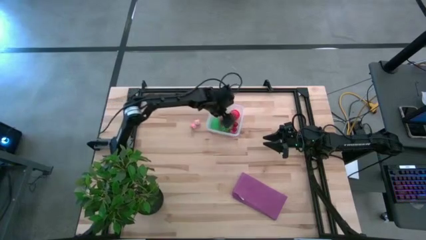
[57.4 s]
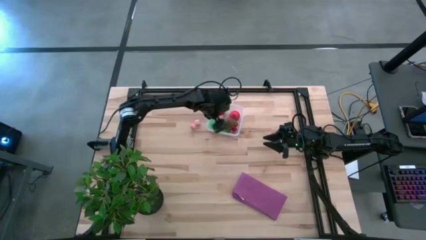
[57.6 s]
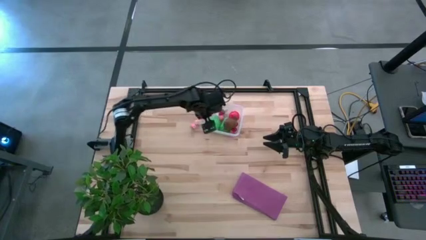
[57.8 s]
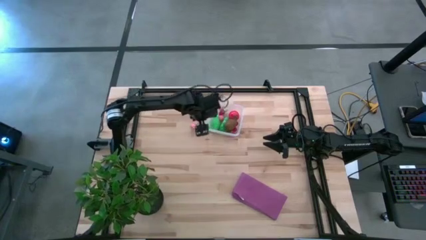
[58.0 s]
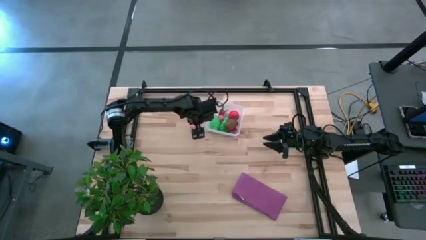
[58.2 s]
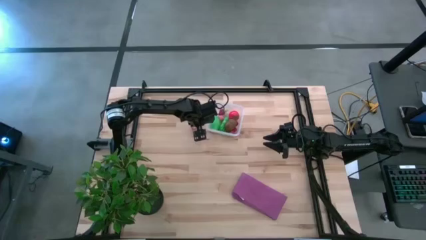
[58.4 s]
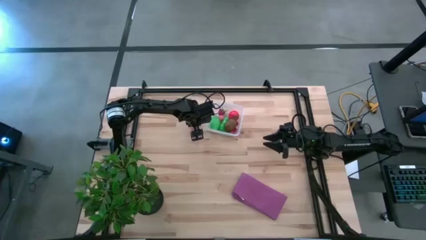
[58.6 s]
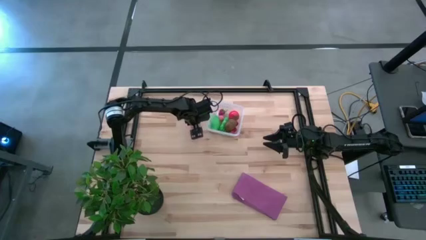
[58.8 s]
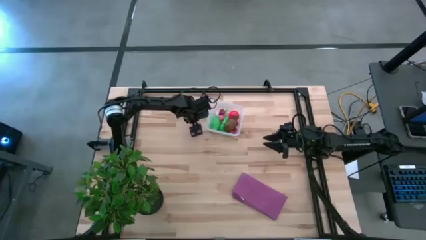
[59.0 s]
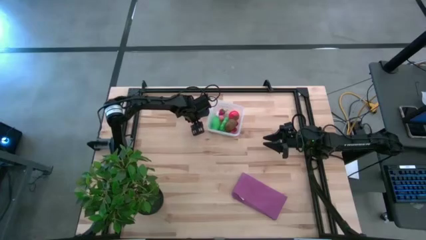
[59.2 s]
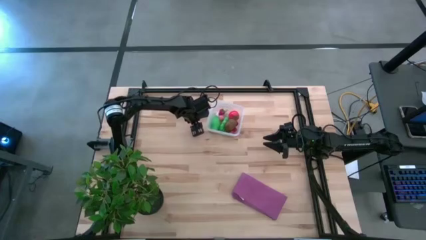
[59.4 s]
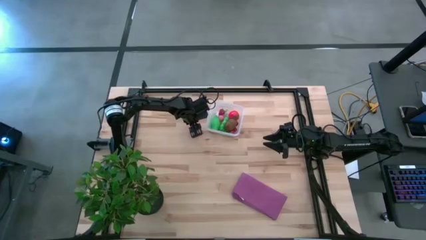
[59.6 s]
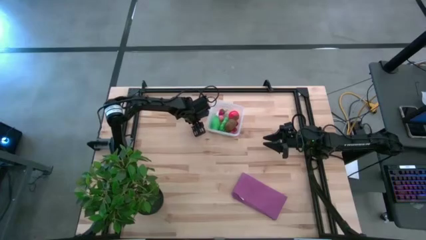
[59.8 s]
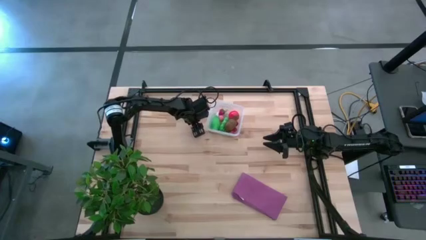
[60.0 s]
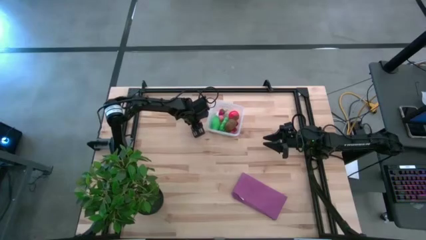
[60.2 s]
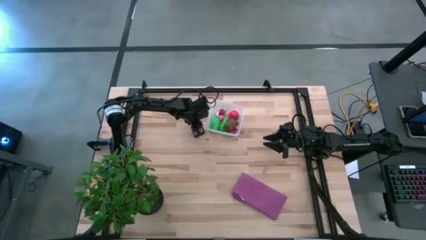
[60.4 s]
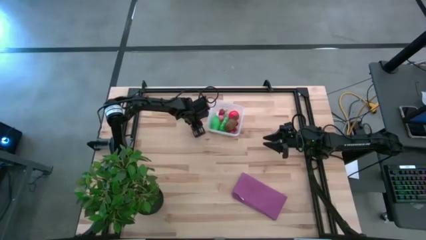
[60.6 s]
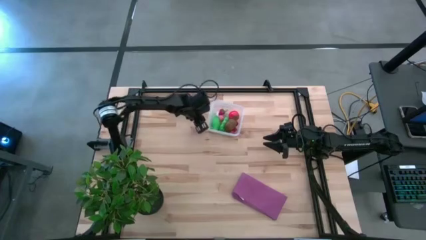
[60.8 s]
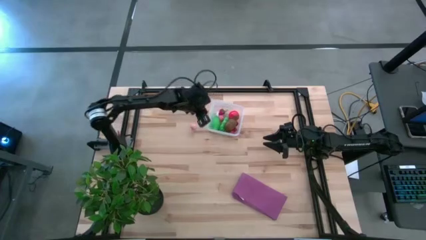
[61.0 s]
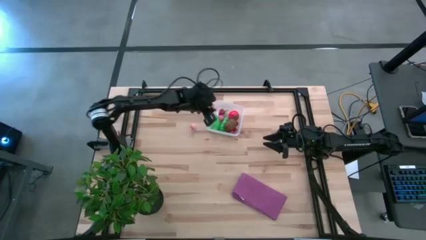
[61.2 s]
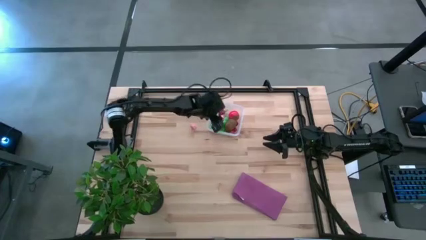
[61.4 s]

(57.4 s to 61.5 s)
Task: Pick and placing Produce into tupperware
Put the top peach in the transparent bin

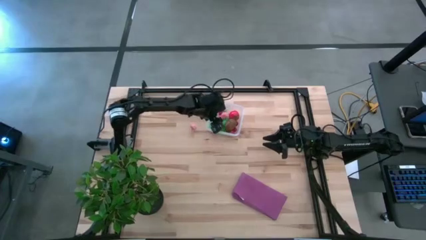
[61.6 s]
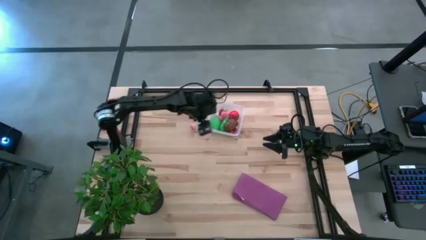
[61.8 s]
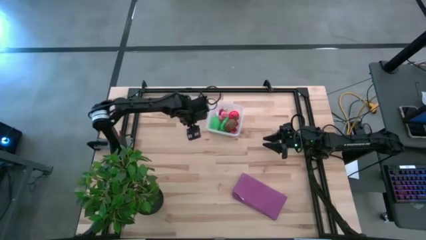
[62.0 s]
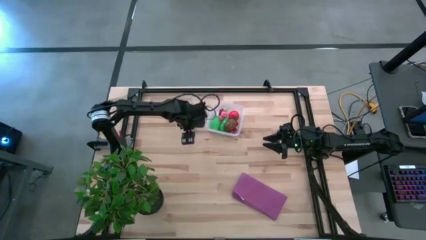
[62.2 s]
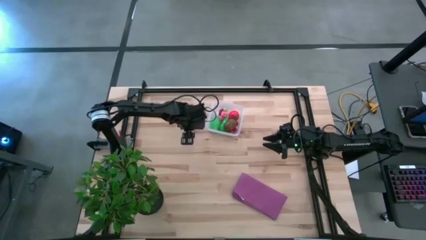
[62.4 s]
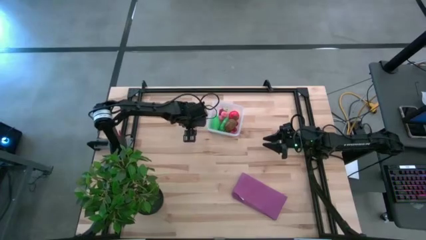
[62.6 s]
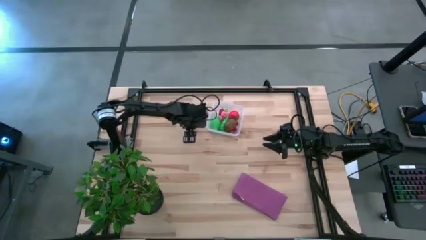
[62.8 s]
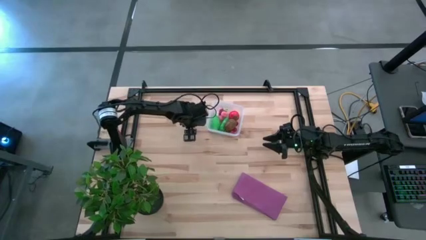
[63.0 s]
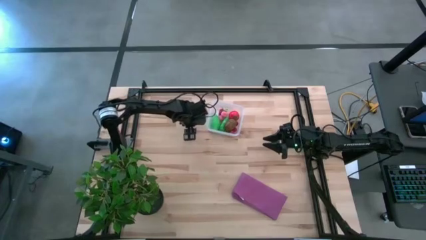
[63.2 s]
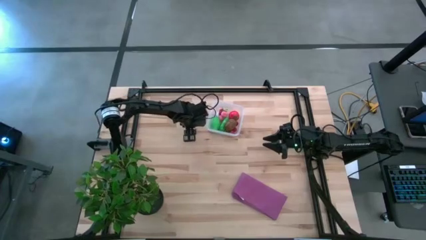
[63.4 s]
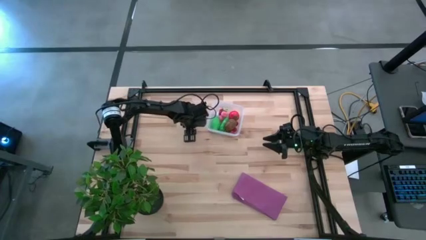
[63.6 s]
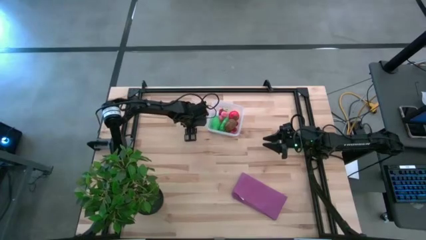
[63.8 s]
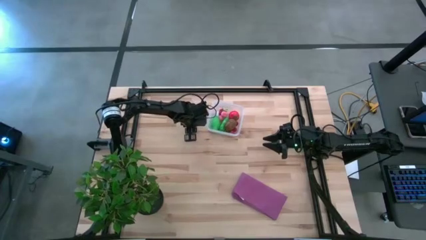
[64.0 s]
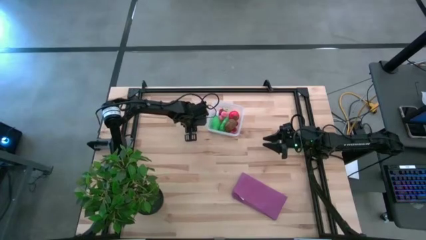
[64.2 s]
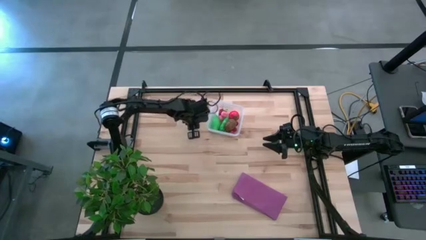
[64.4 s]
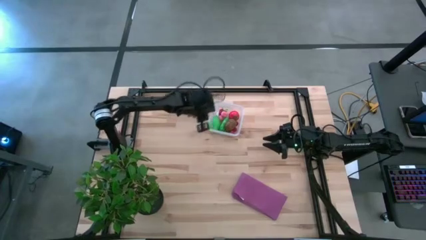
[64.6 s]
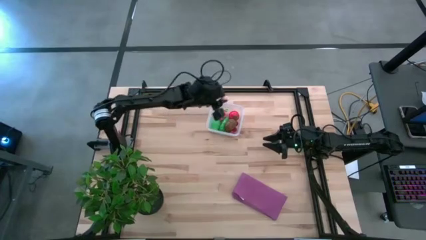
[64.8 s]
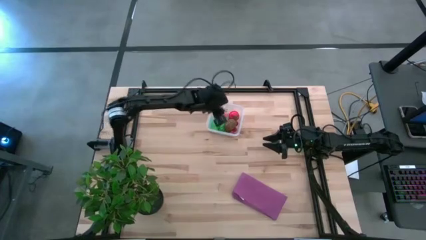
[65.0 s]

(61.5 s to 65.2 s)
Put the peach in the transparent bin

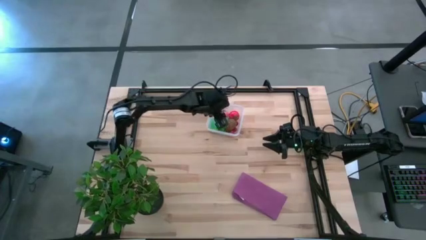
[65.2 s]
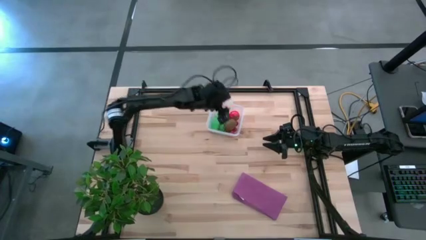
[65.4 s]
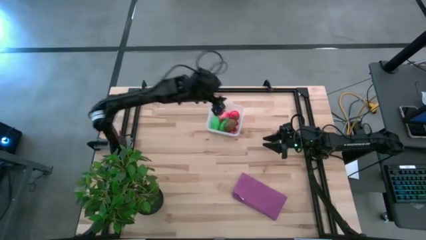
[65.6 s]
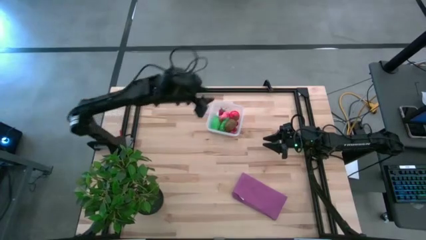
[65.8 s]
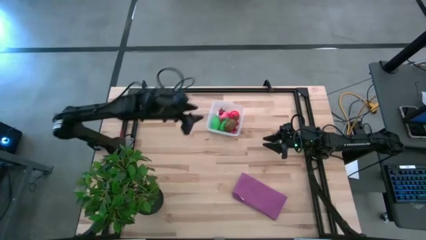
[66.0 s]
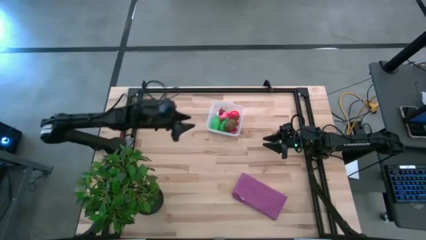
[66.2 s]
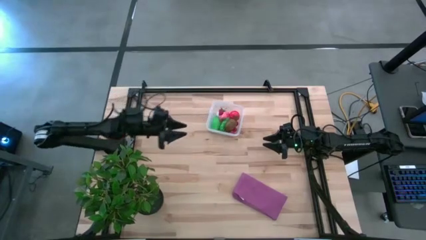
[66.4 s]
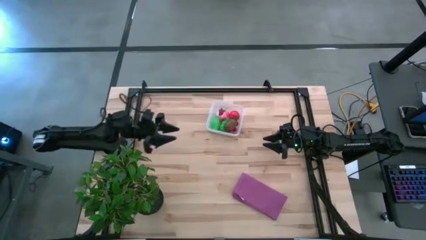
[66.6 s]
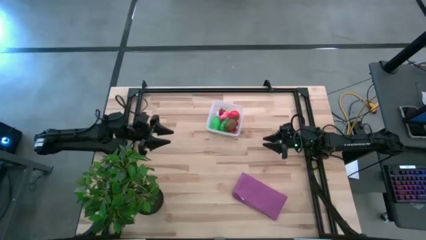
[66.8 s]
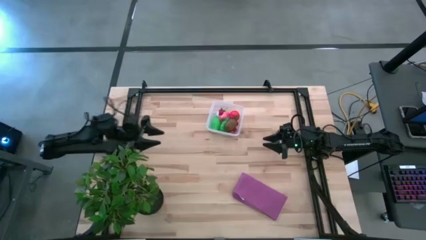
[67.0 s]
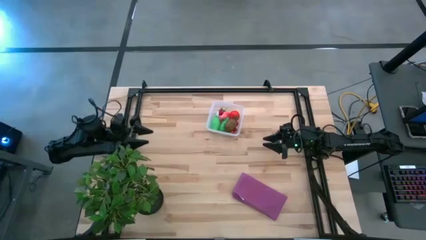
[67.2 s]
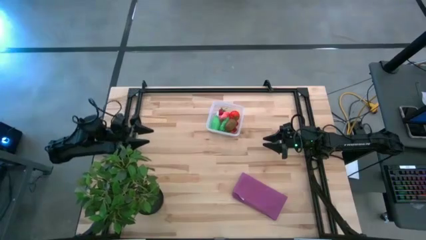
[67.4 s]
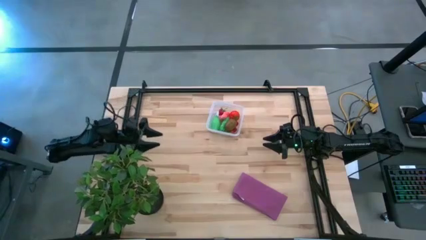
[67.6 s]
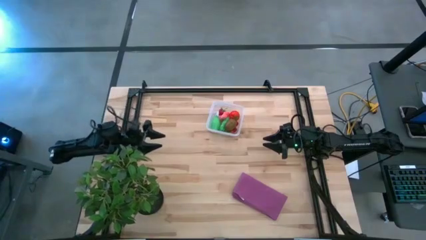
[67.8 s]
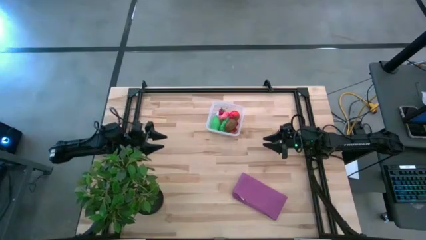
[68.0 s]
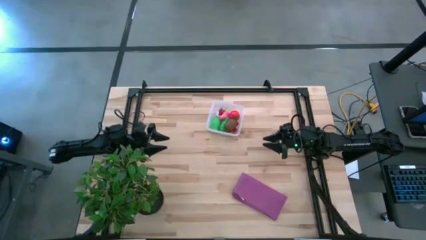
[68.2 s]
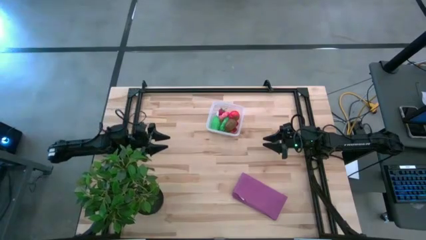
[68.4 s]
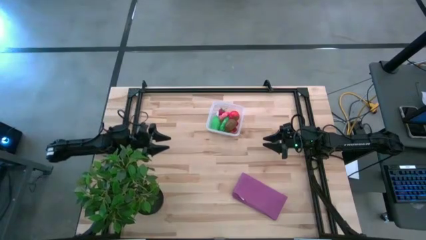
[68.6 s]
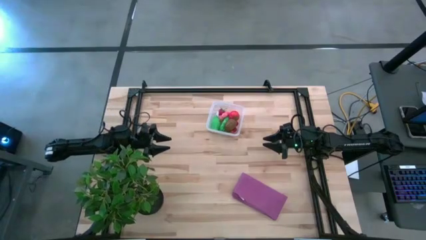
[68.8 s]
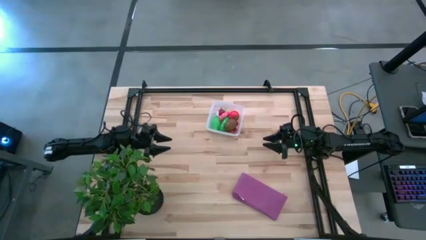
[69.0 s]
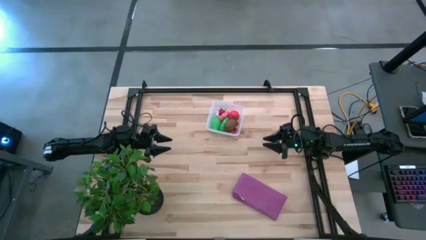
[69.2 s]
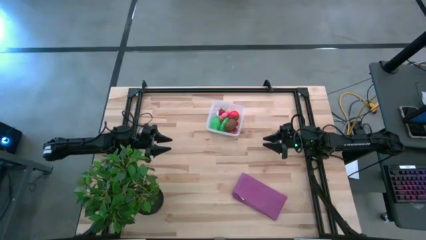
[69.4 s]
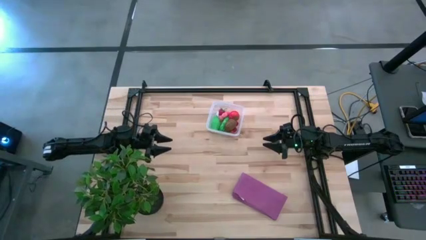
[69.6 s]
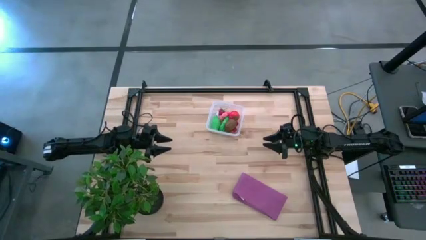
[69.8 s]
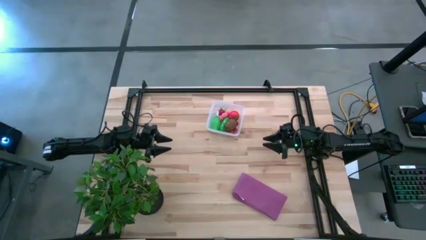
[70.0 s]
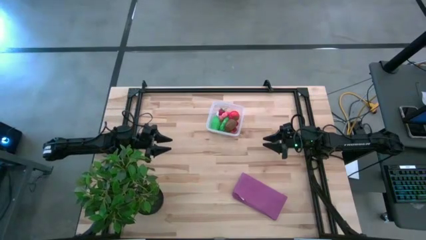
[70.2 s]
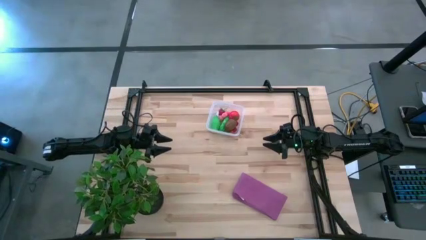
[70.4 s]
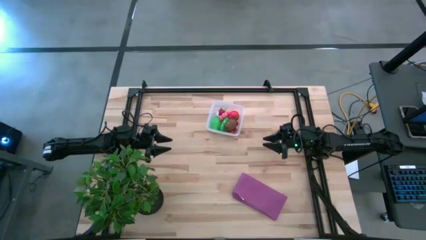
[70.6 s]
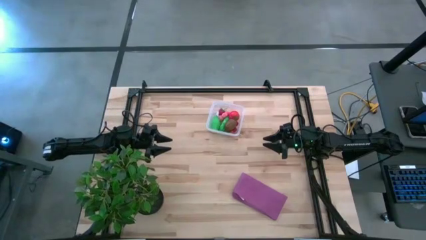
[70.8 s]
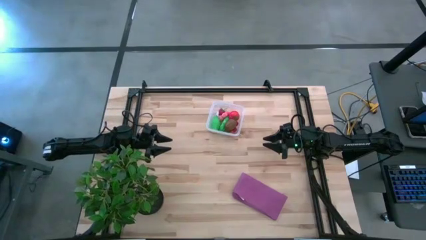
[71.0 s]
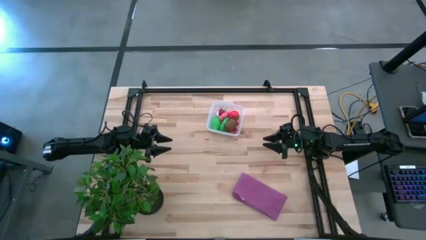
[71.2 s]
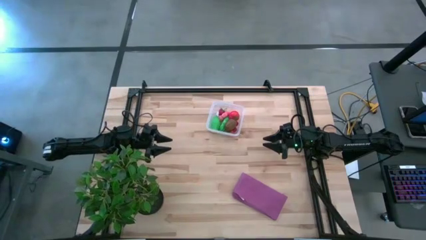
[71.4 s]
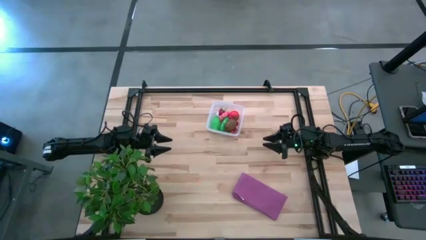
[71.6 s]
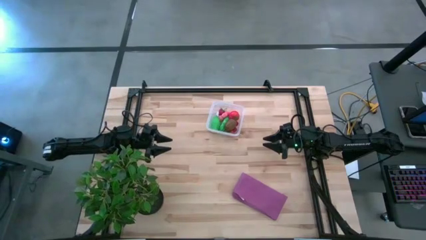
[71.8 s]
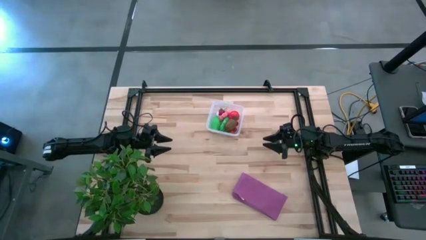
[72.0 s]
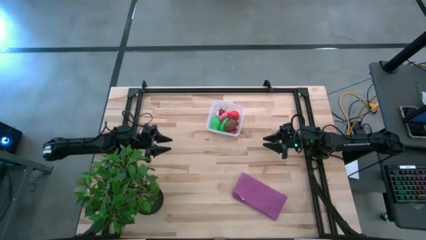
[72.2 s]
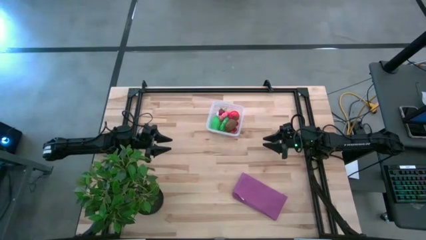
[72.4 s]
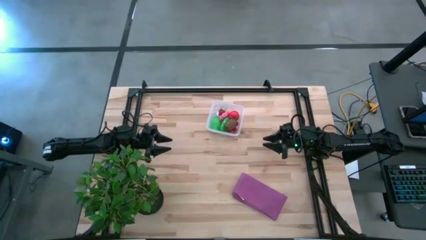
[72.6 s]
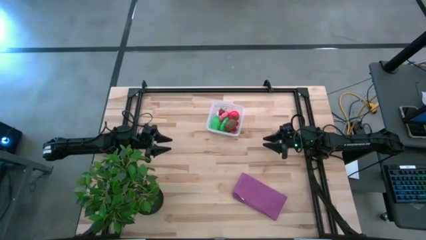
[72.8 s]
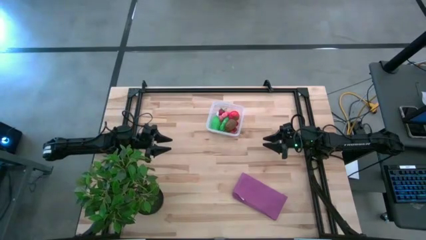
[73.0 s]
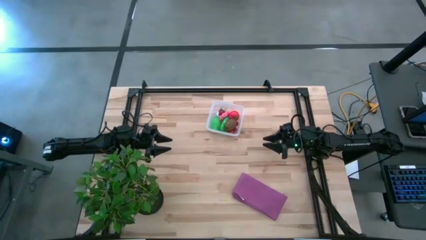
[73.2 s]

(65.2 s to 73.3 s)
Return to Home Position
